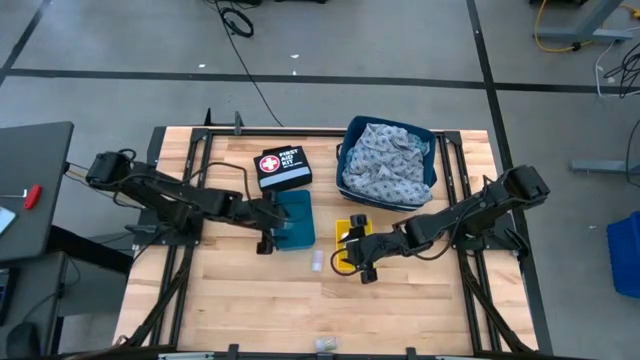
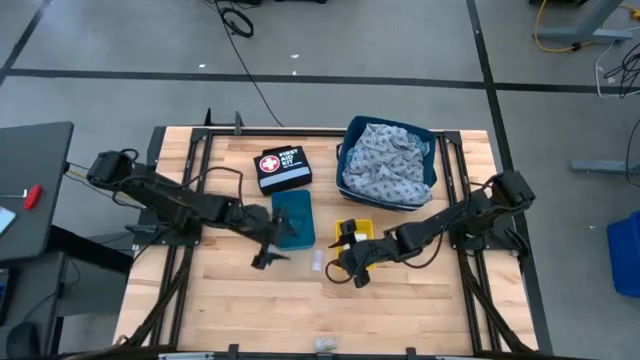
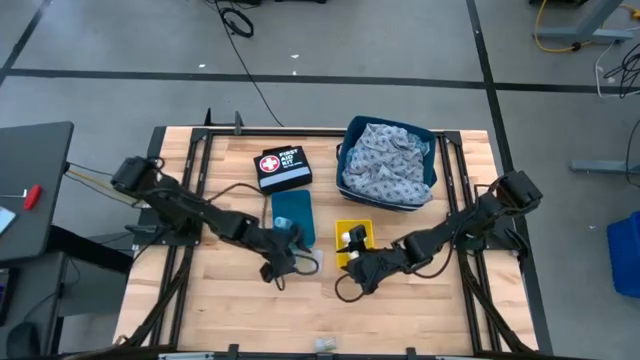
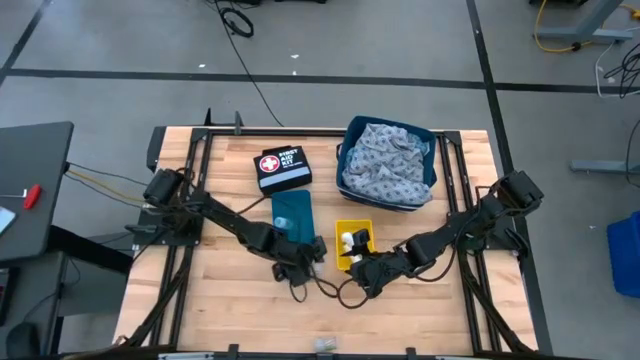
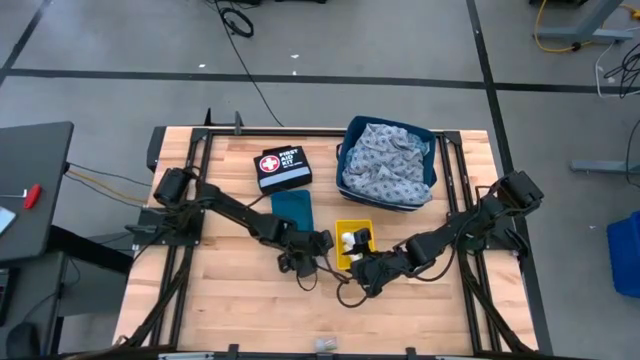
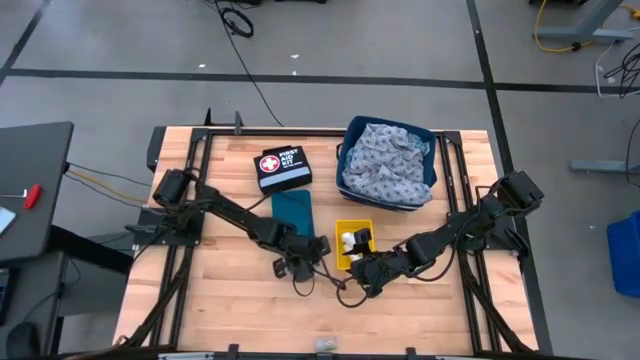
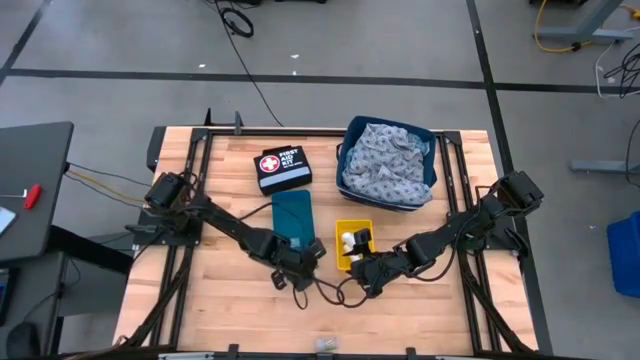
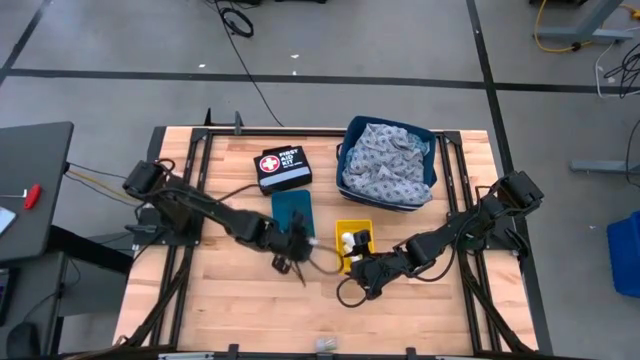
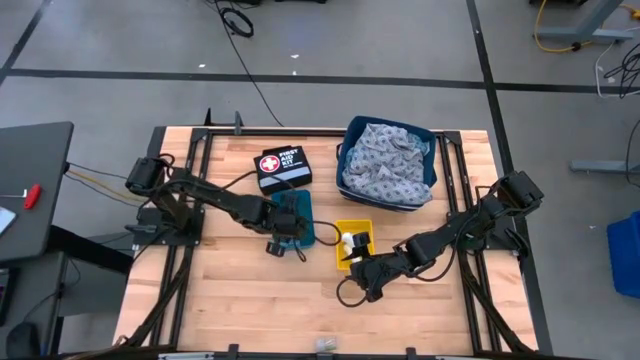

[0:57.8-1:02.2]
Task: Pick & place medical supplies in basket/bin
Put the top transparent pill bottle into the blue bin

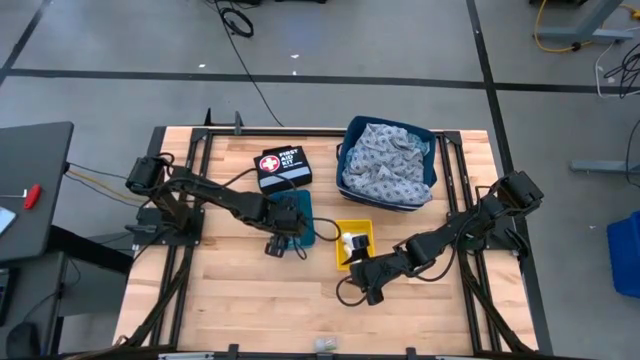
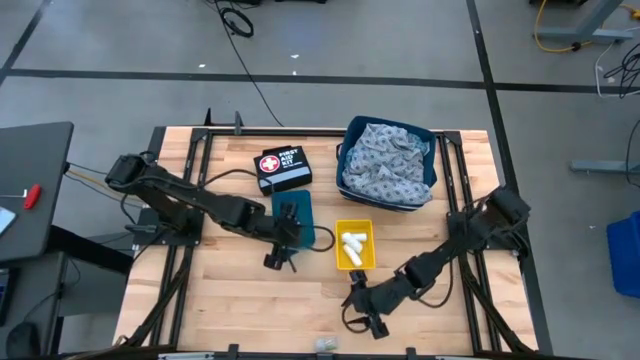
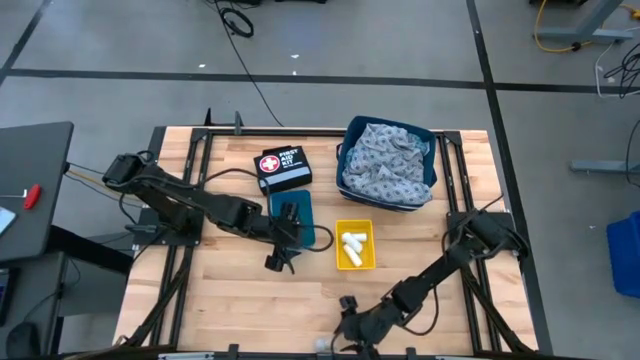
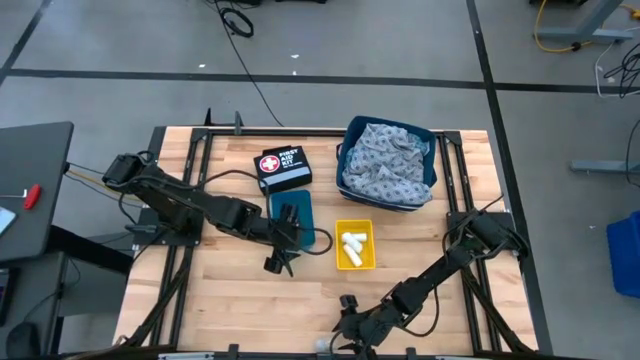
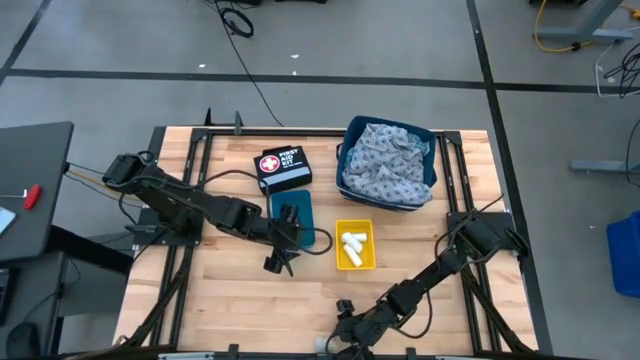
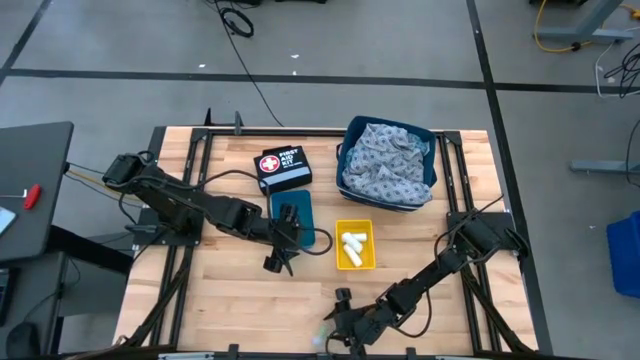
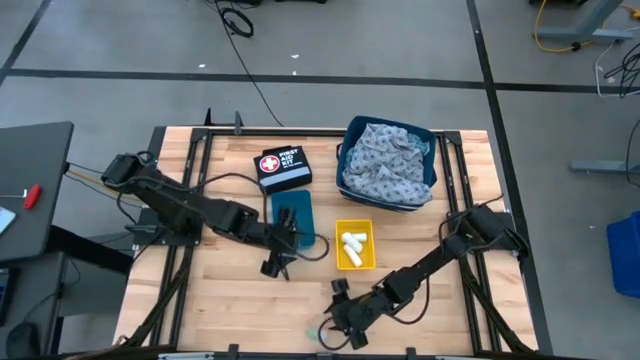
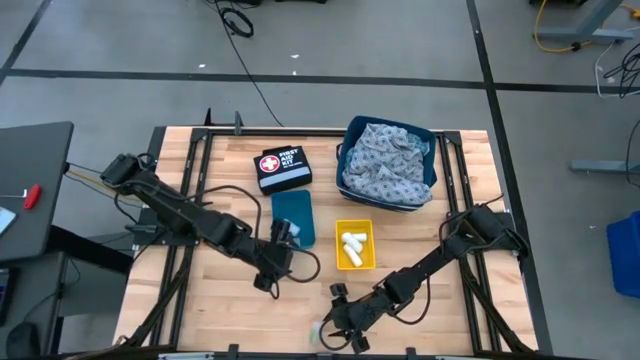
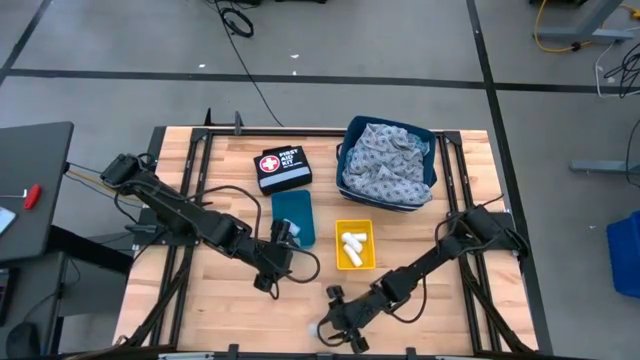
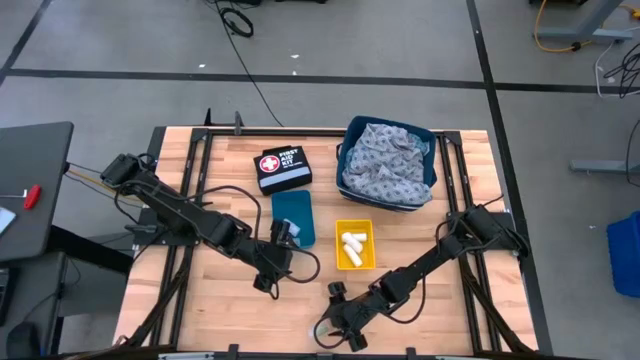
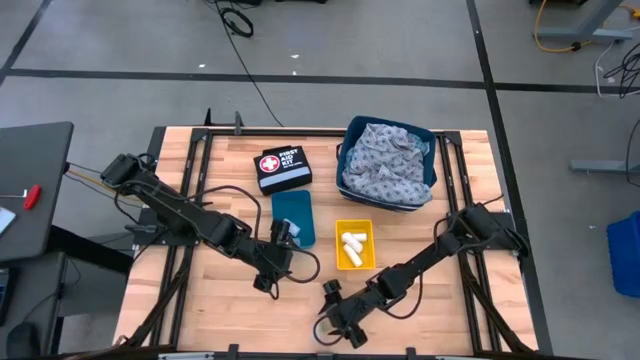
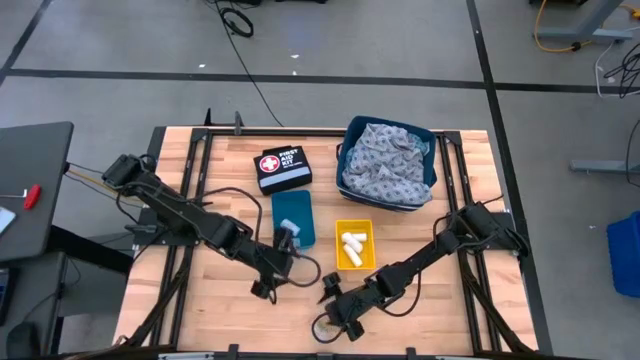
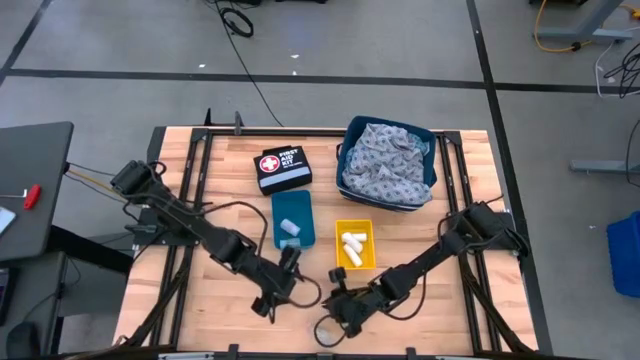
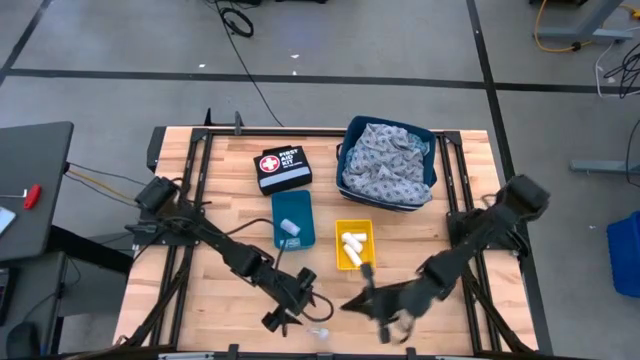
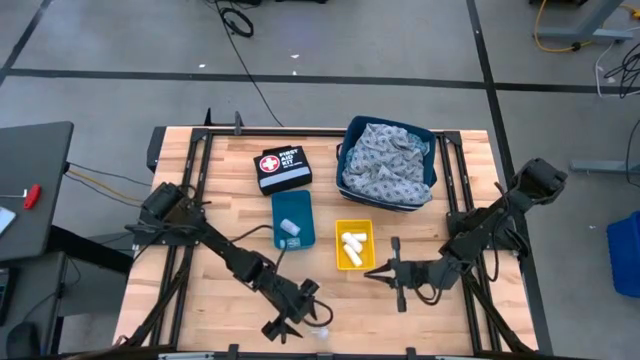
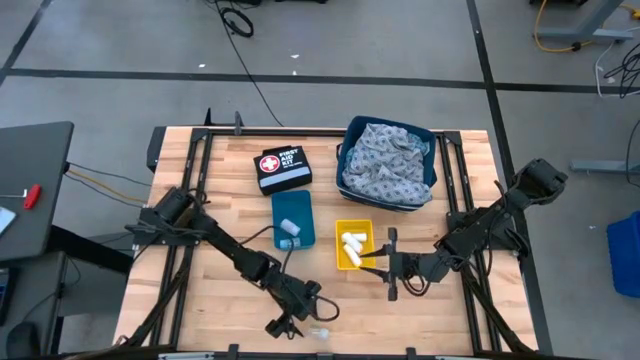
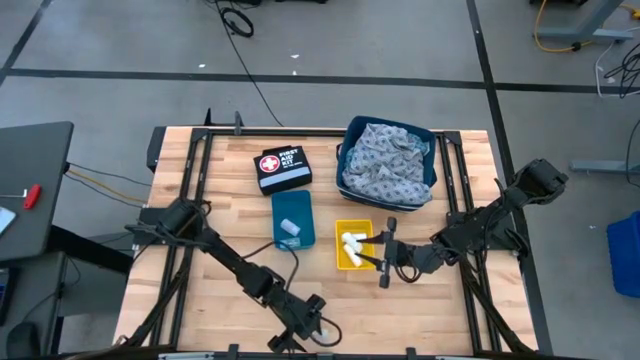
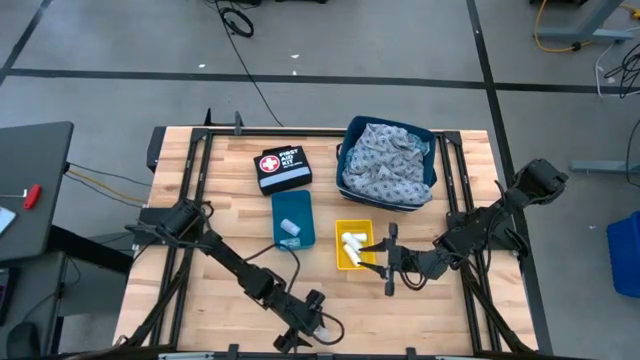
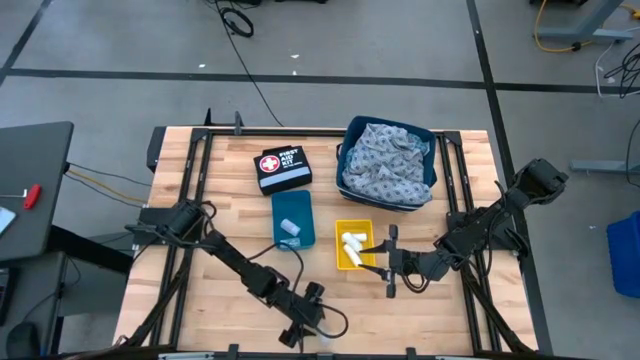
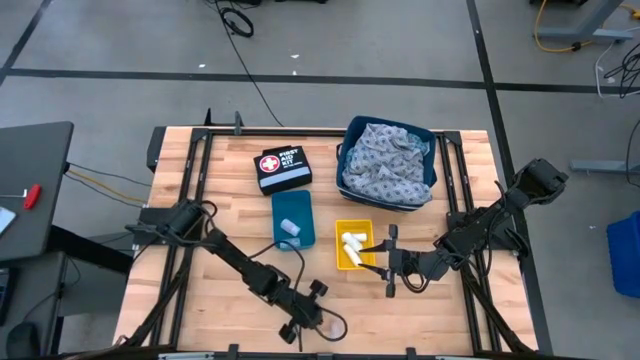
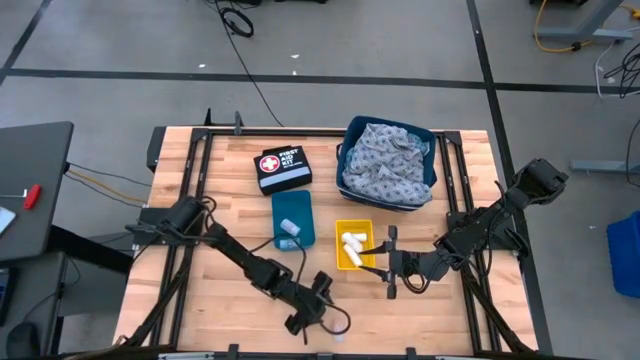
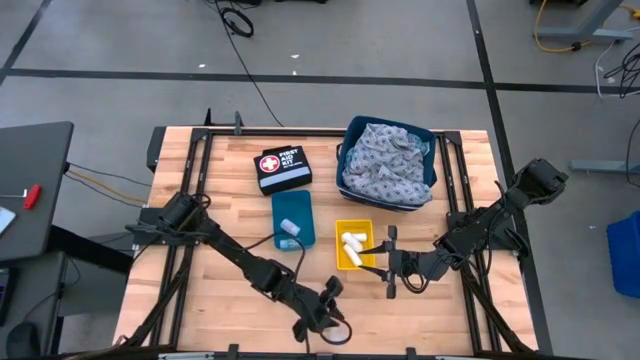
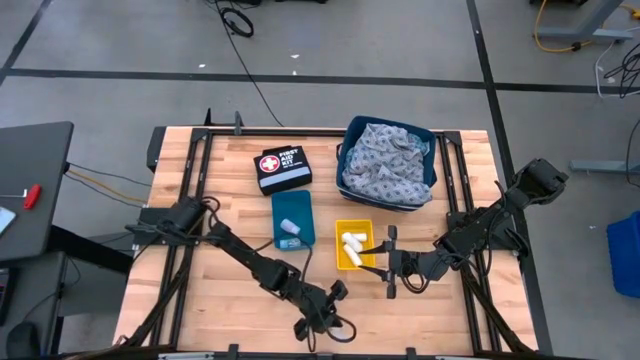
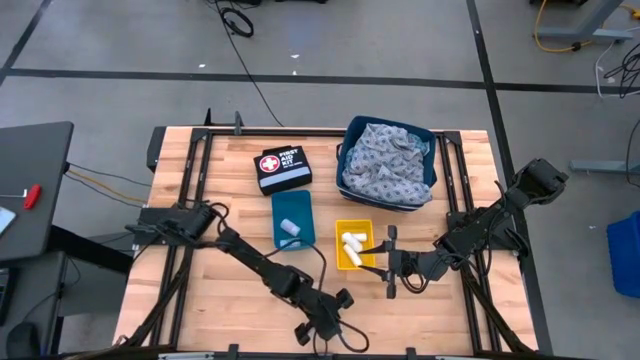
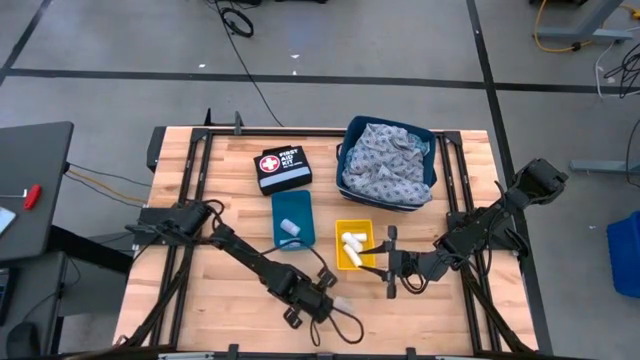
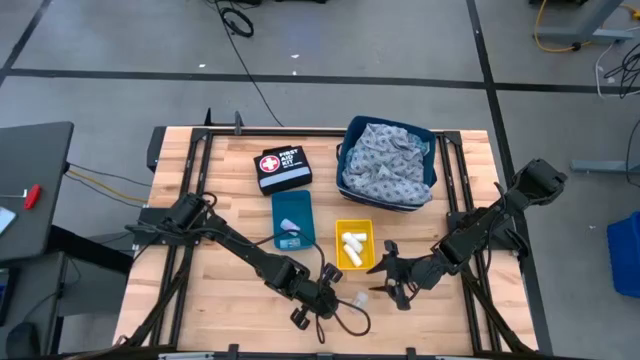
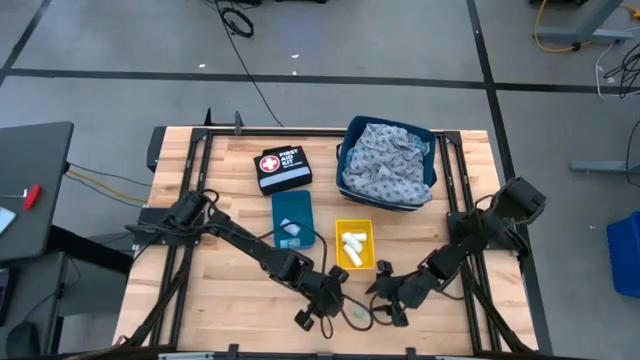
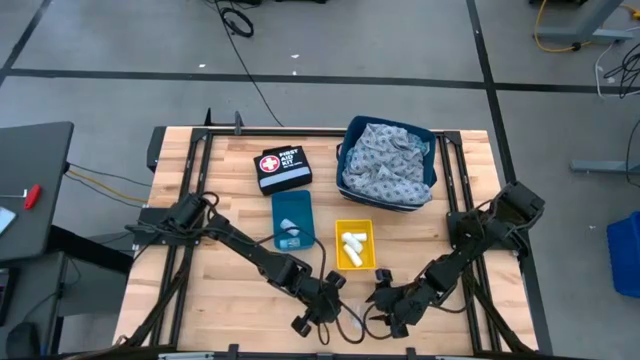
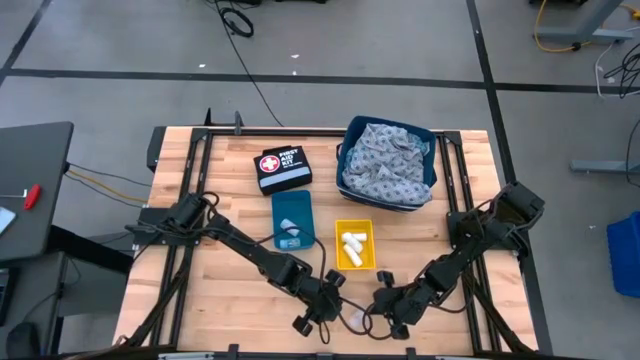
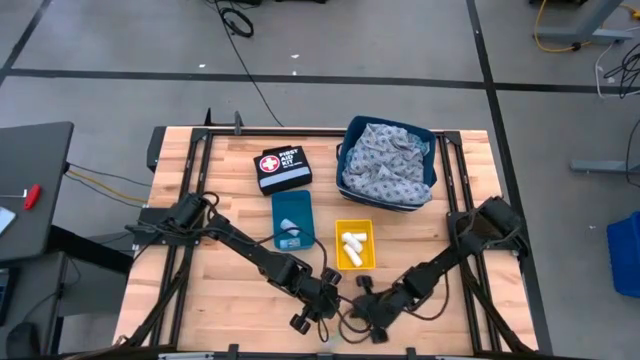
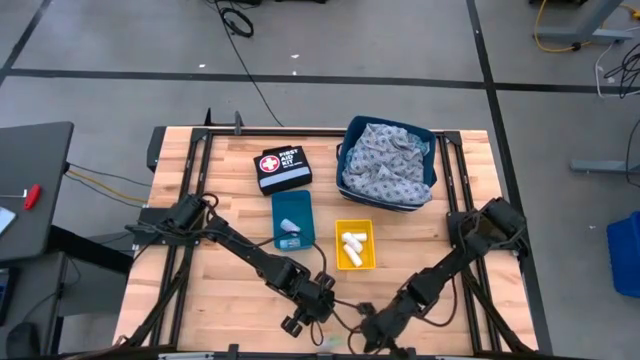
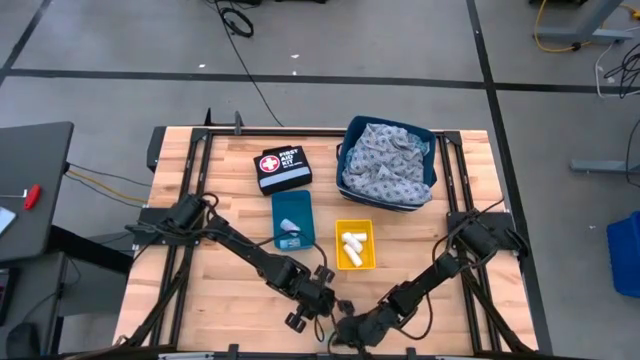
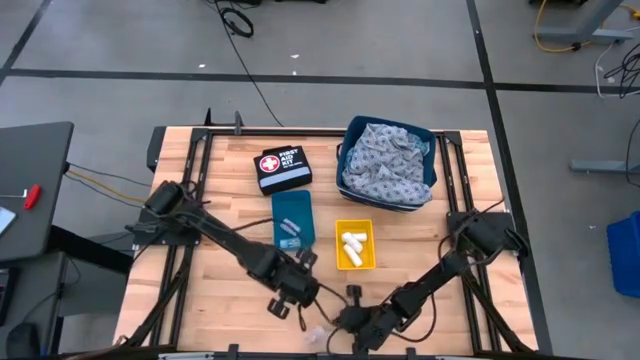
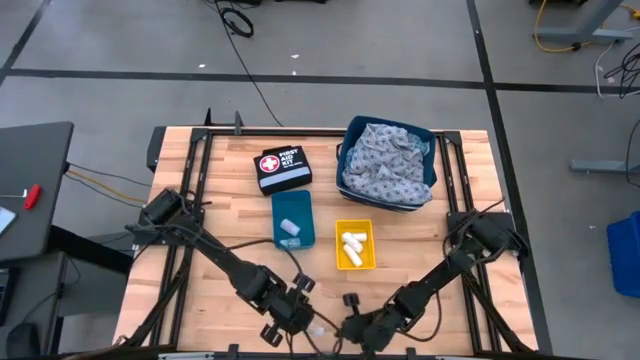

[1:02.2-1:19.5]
Put the transparent pill bottle into the blue bin
